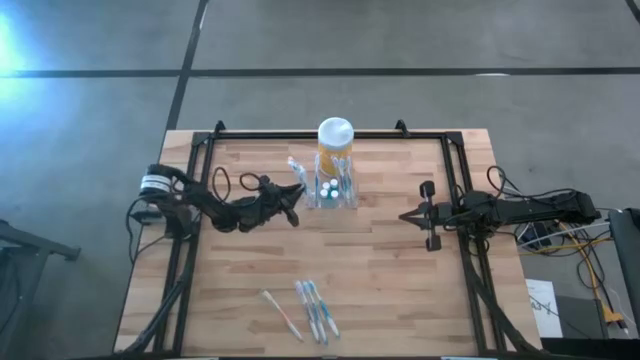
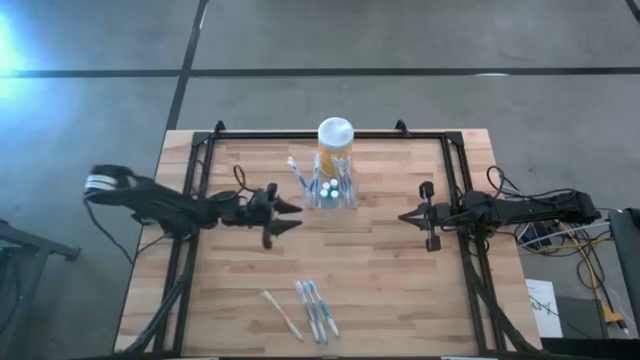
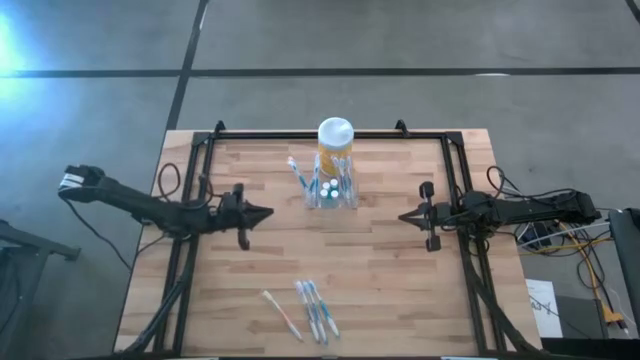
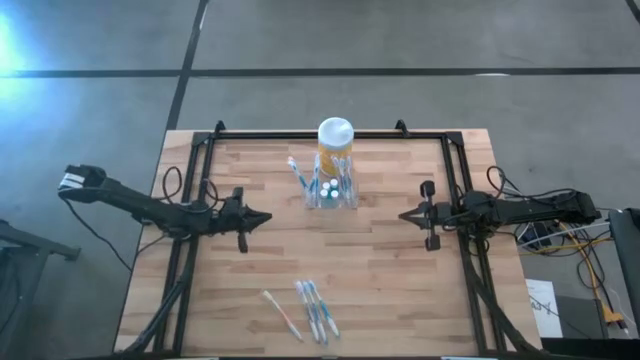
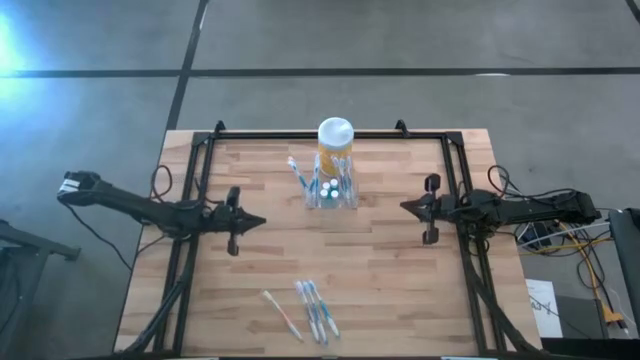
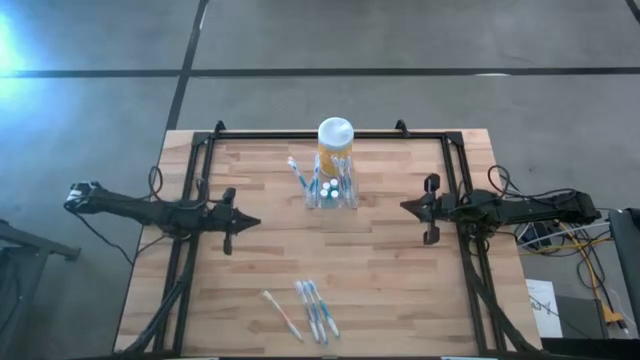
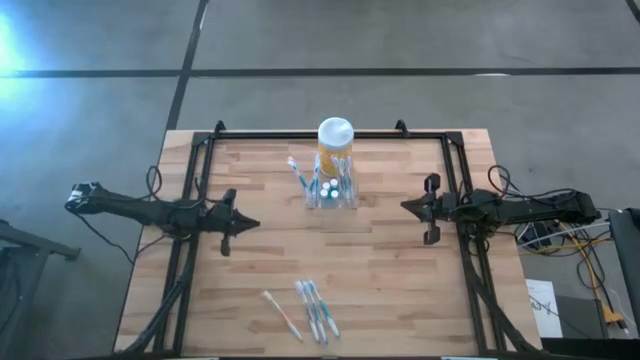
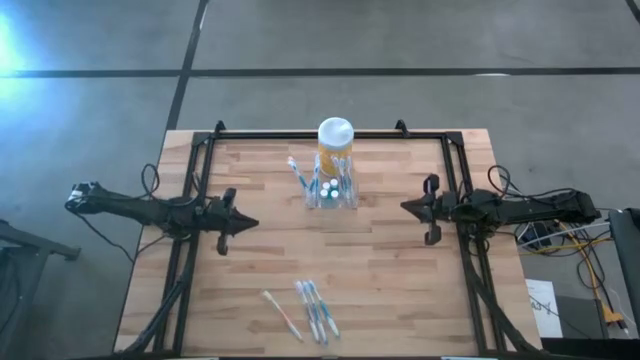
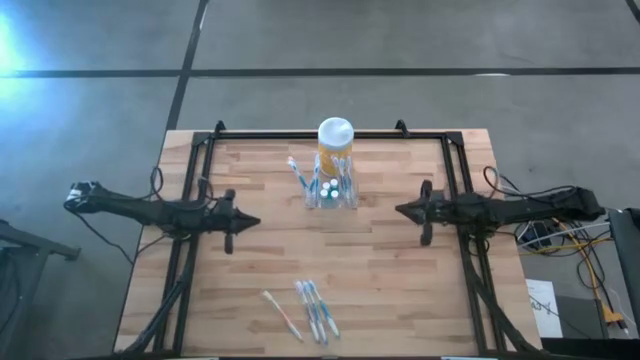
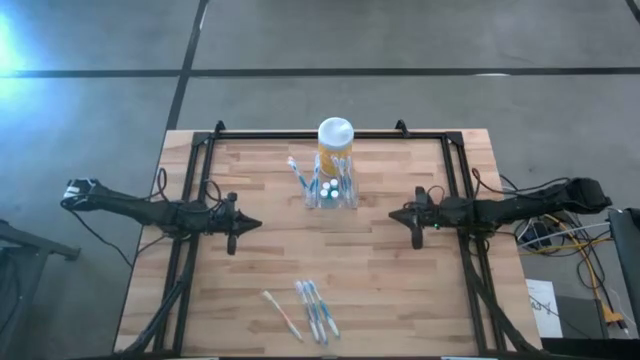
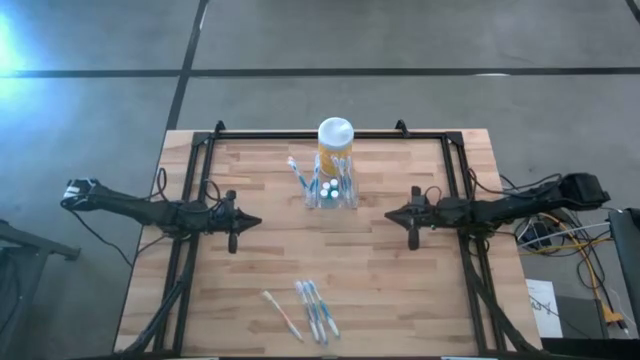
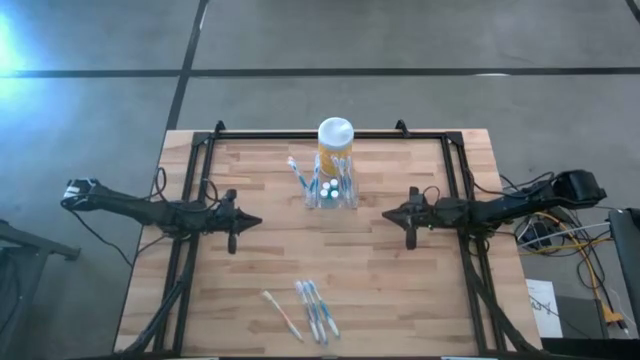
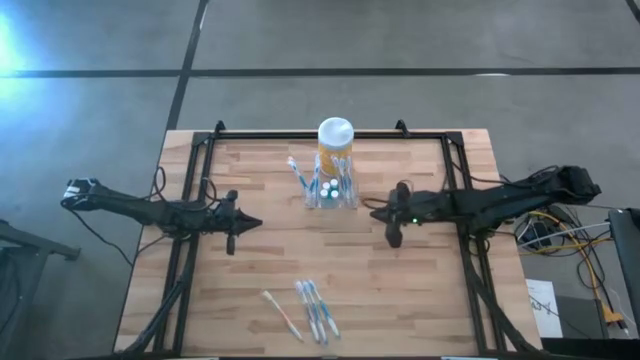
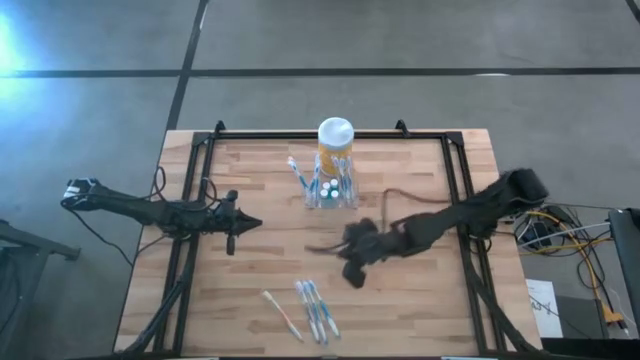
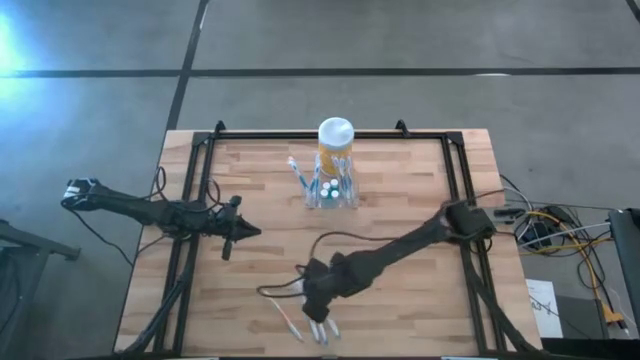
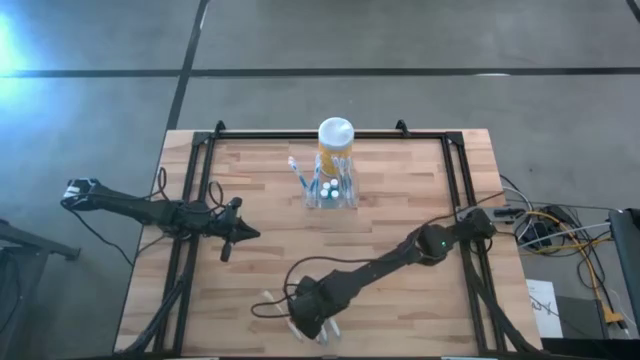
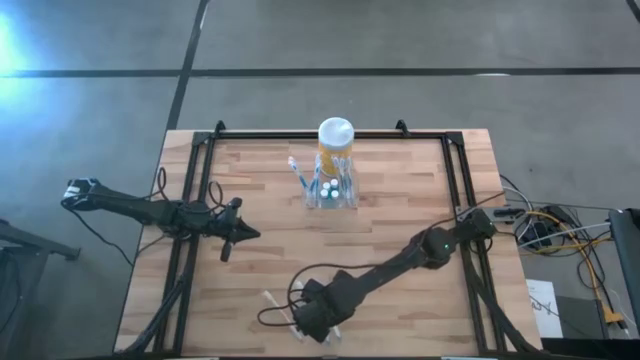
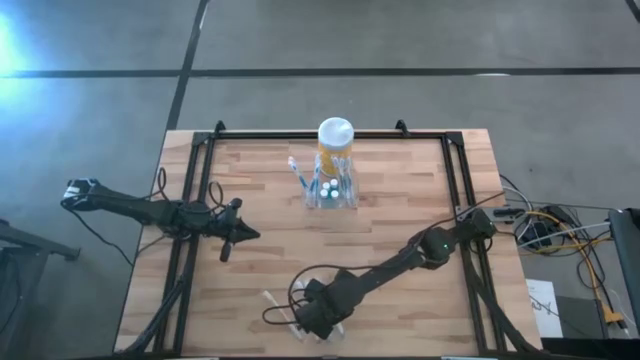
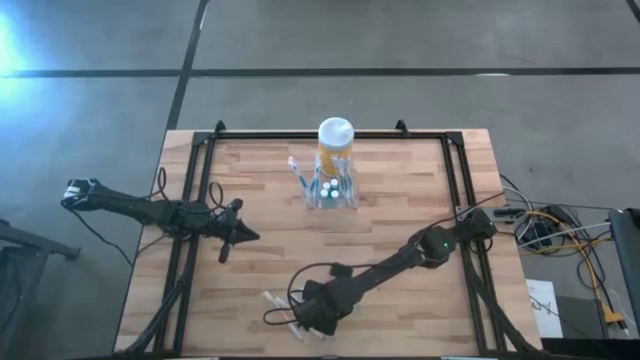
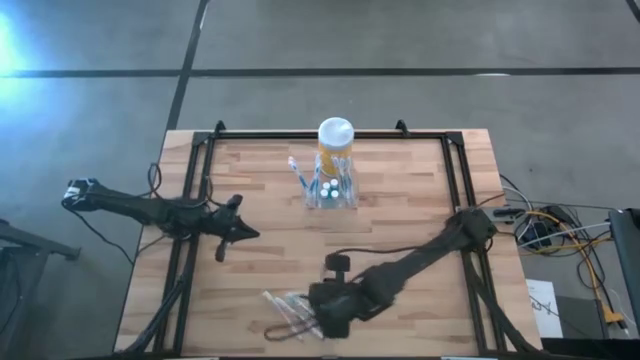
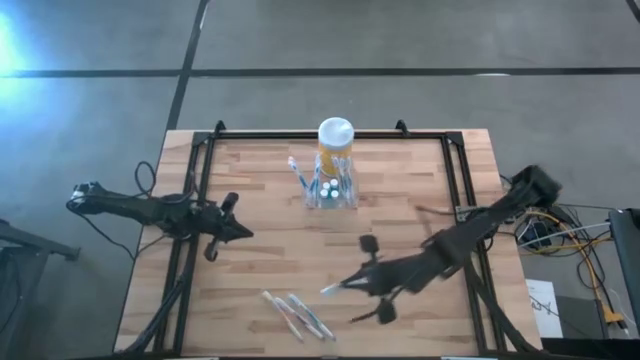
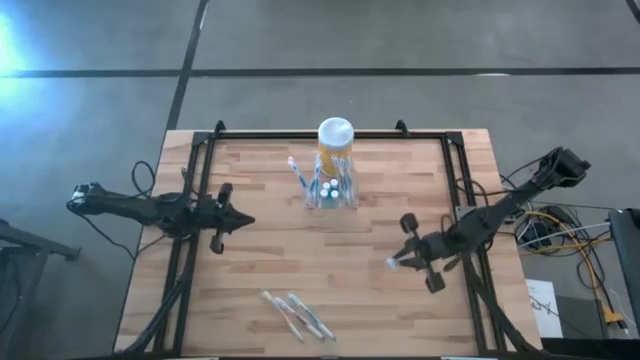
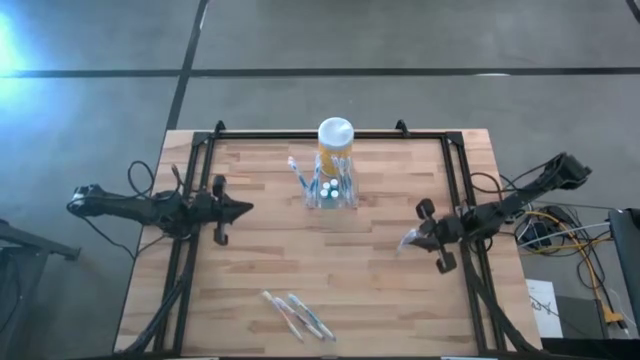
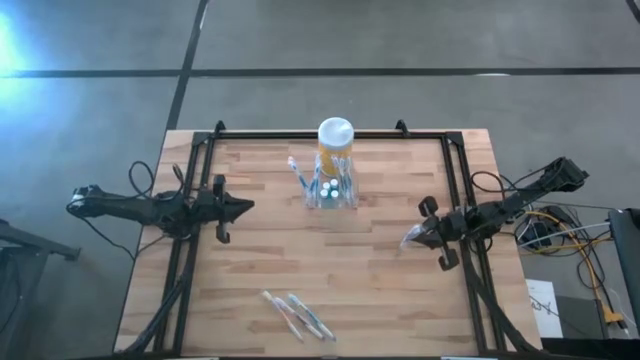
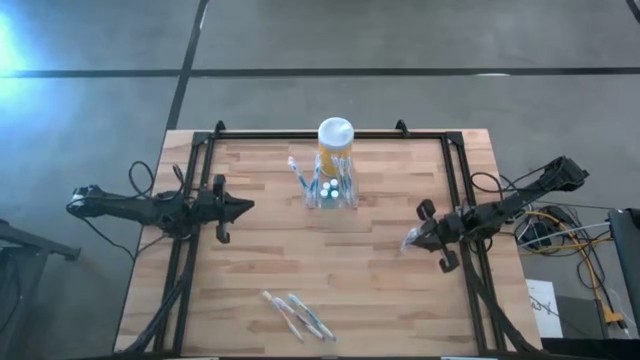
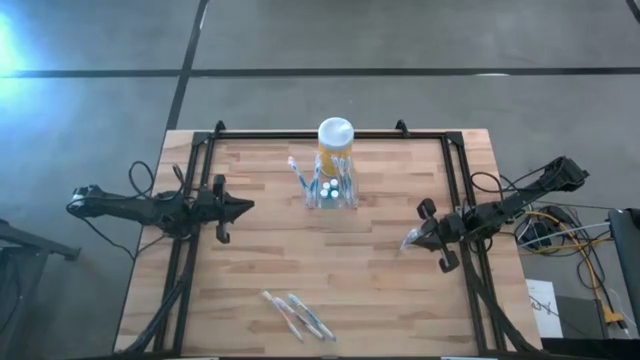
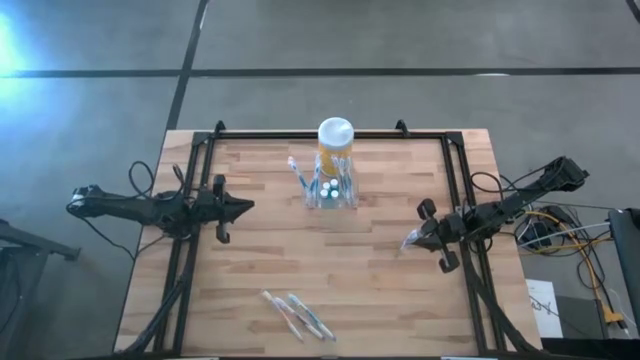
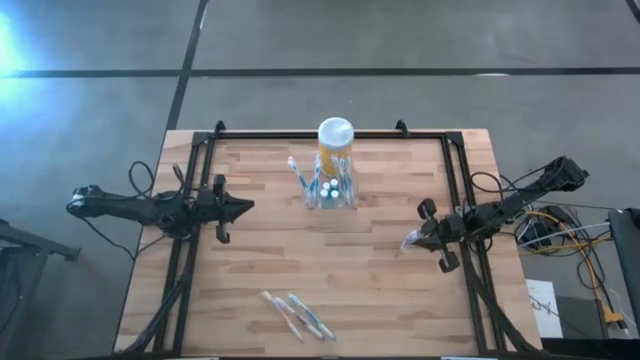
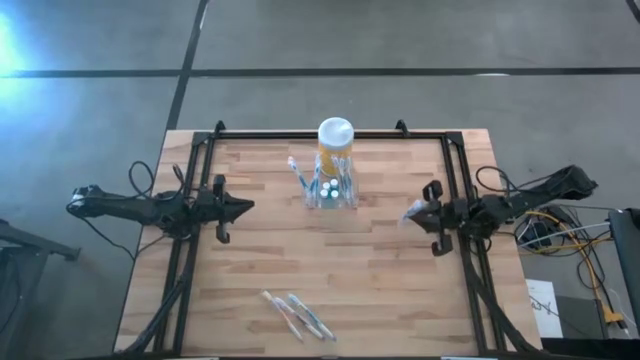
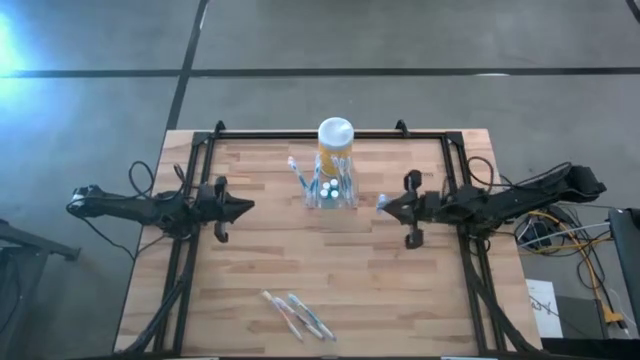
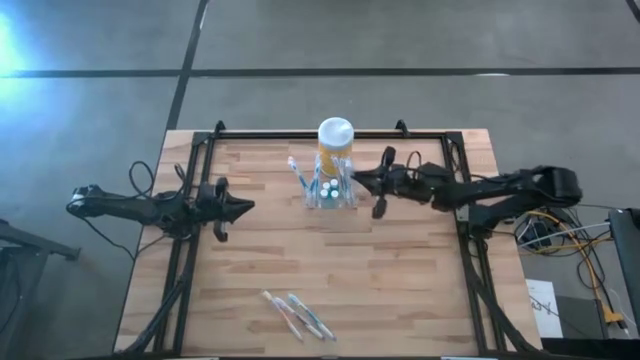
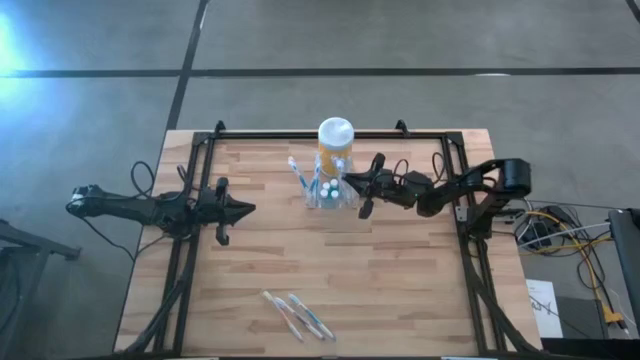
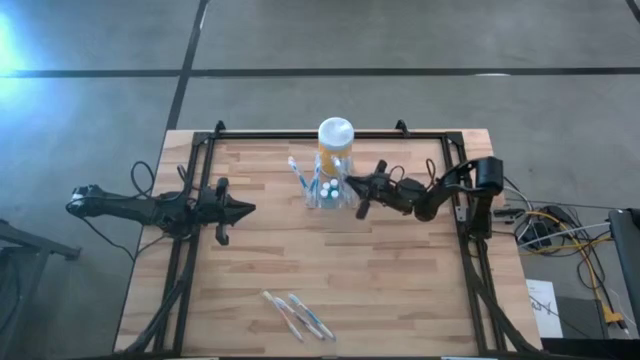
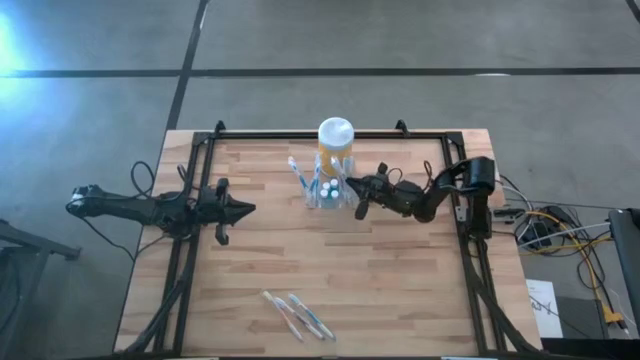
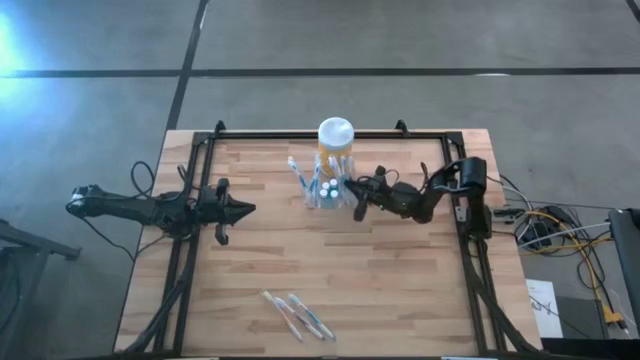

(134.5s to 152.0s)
Task: Pick & Place toothbrushing station
Put the blue toothbrush into the transparent organizer

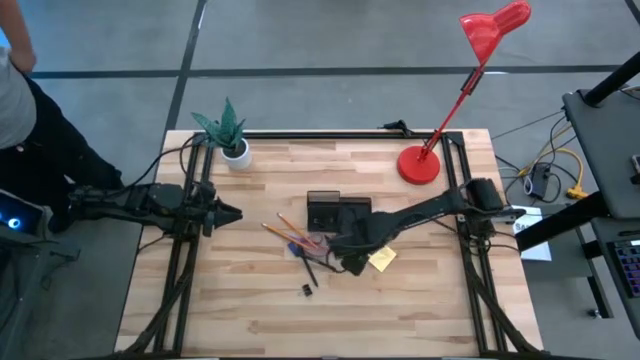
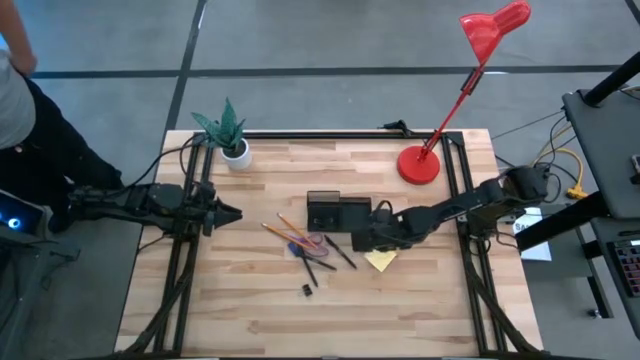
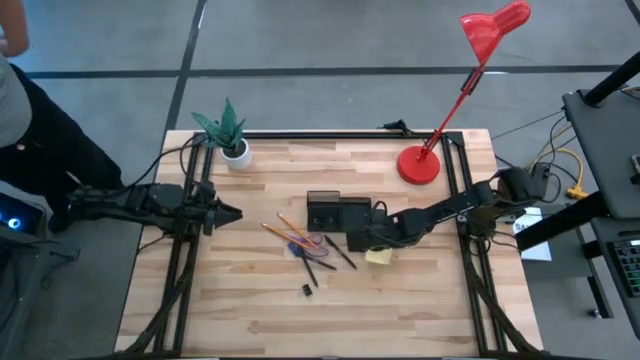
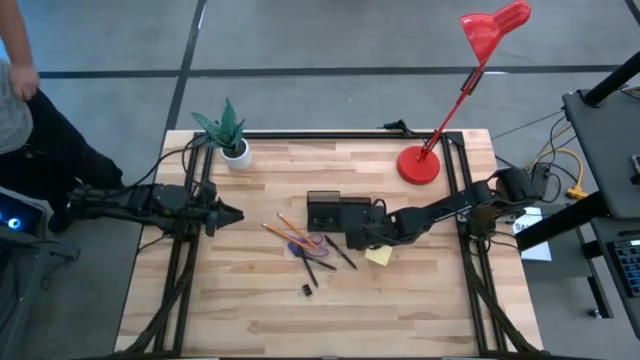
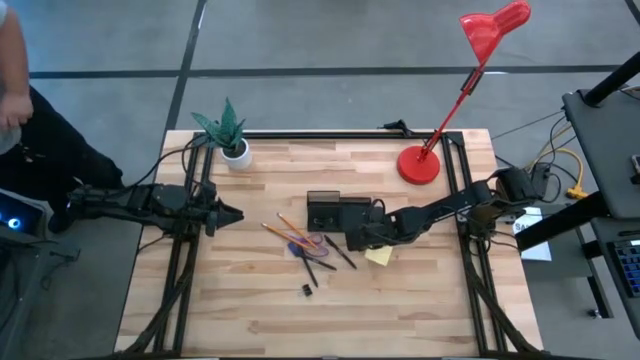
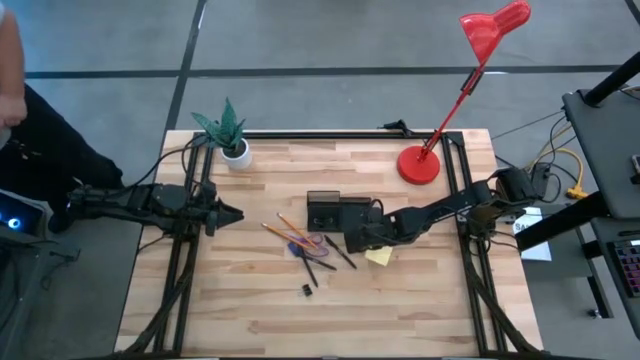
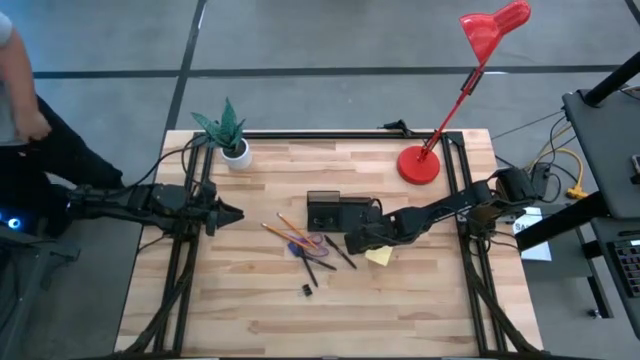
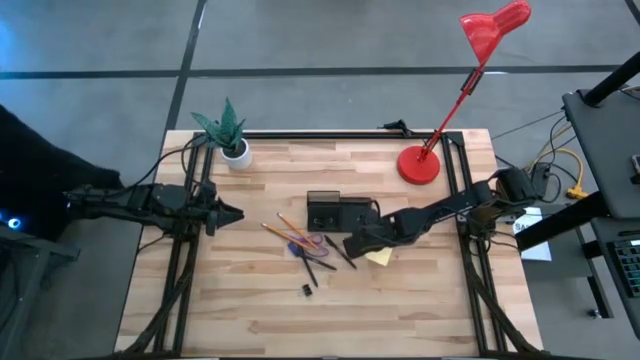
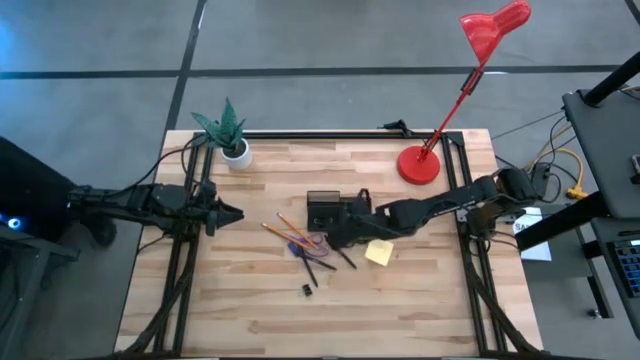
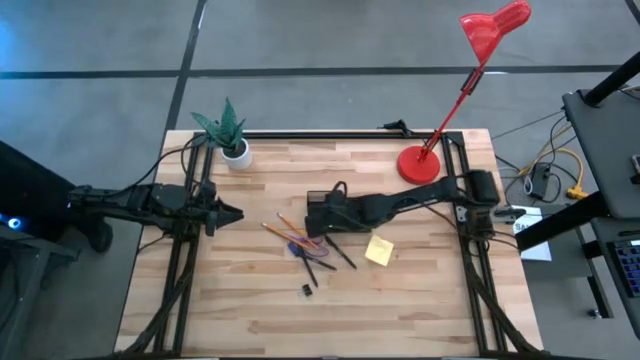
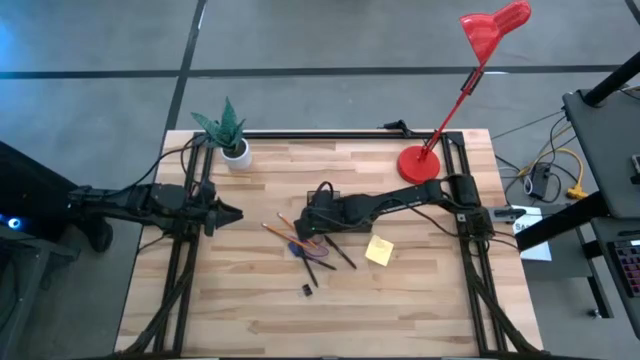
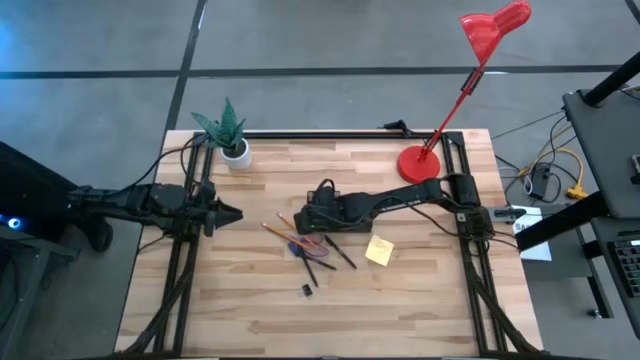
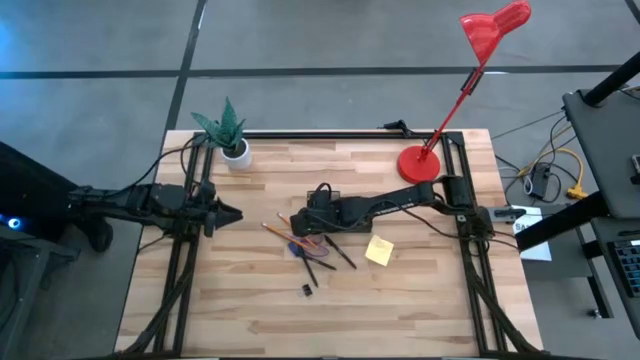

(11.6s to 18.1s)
Task: Pick and place office supplies into organizer
Put the top black binder clip into the desk organizer
